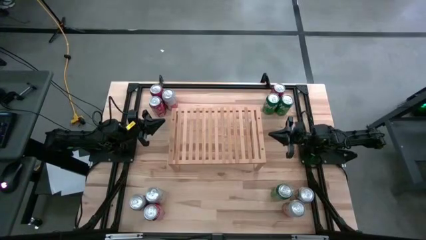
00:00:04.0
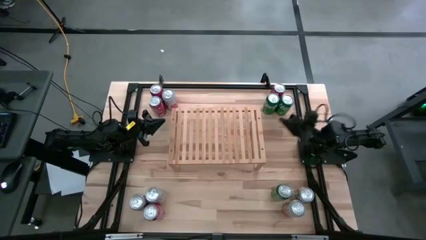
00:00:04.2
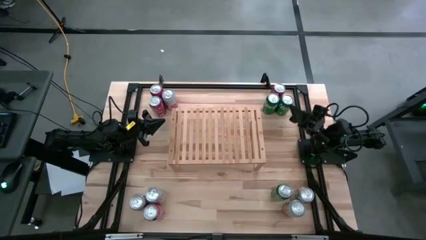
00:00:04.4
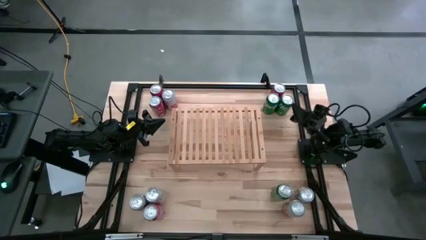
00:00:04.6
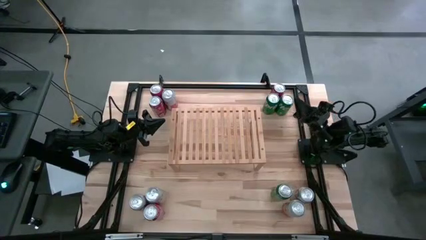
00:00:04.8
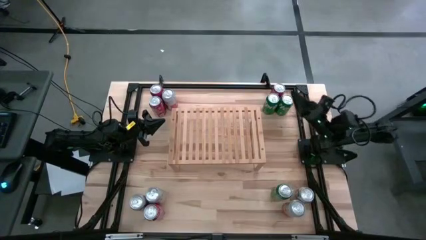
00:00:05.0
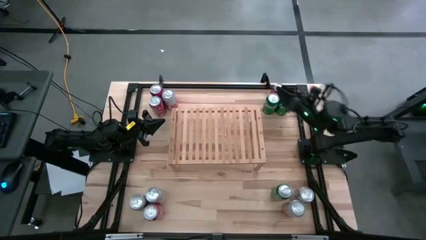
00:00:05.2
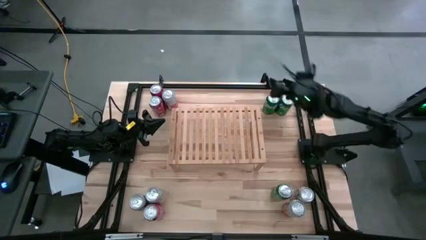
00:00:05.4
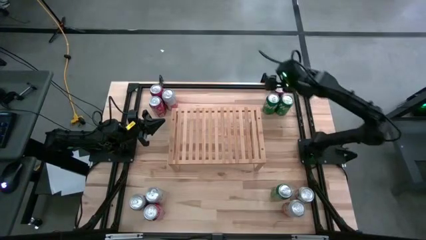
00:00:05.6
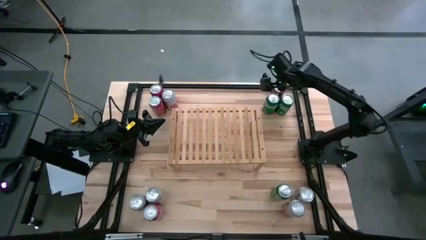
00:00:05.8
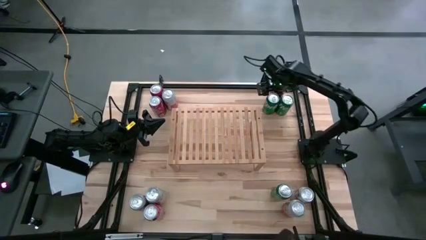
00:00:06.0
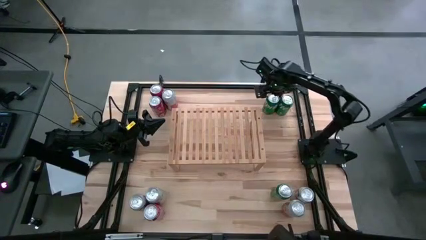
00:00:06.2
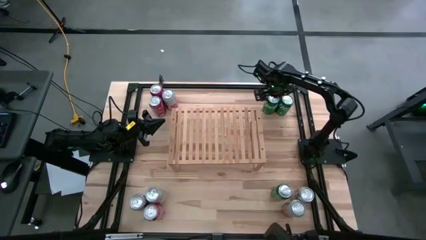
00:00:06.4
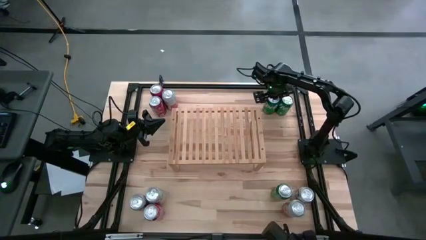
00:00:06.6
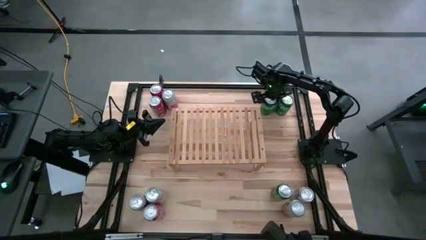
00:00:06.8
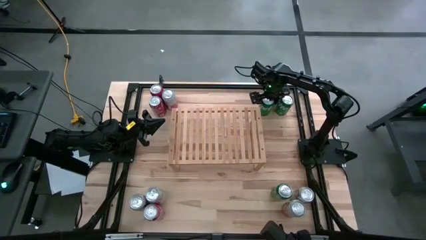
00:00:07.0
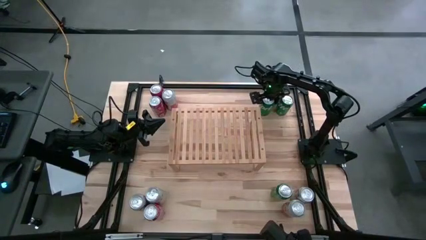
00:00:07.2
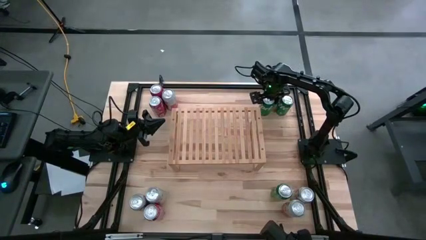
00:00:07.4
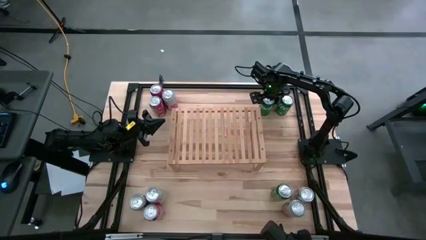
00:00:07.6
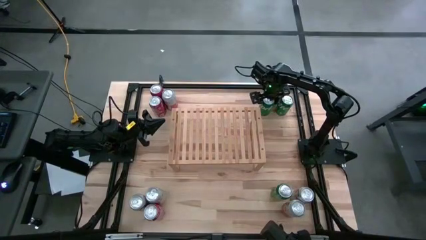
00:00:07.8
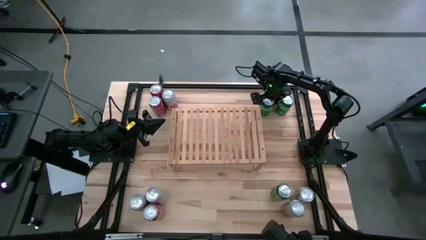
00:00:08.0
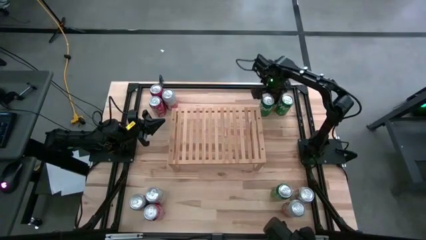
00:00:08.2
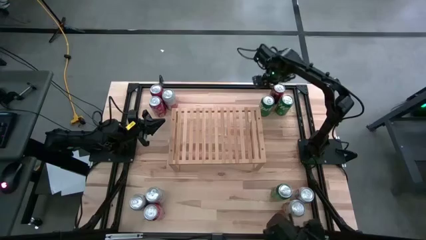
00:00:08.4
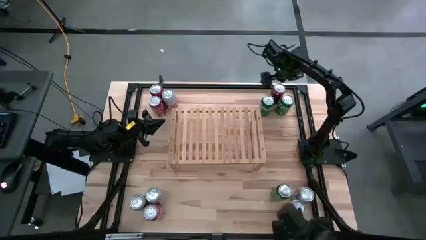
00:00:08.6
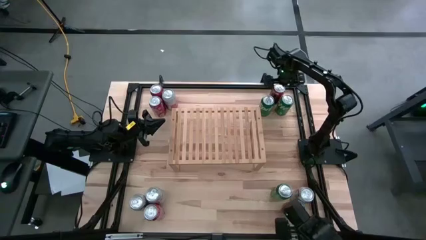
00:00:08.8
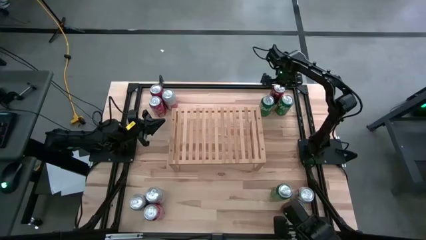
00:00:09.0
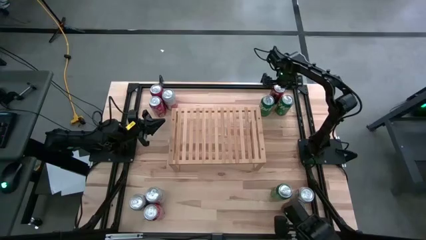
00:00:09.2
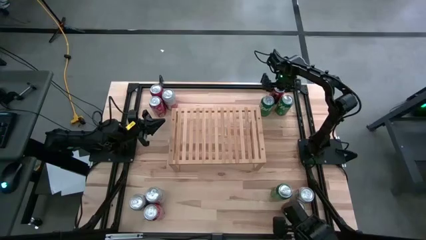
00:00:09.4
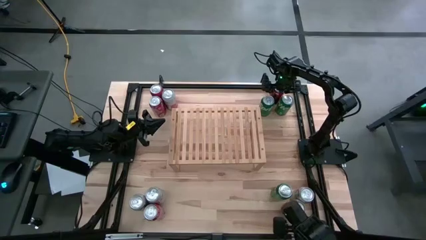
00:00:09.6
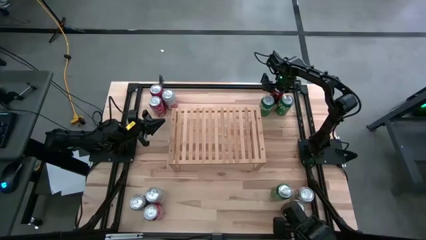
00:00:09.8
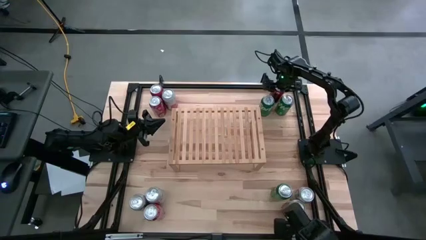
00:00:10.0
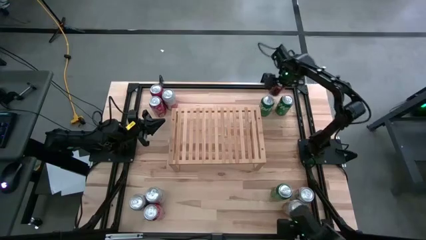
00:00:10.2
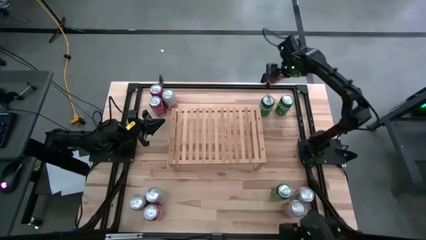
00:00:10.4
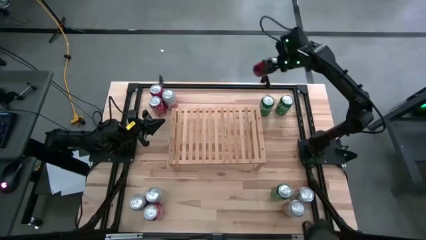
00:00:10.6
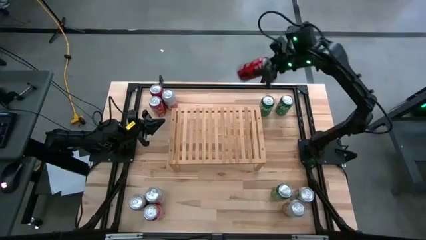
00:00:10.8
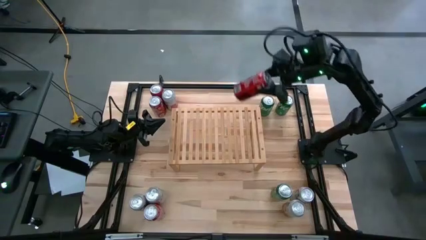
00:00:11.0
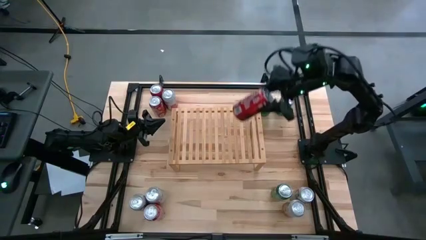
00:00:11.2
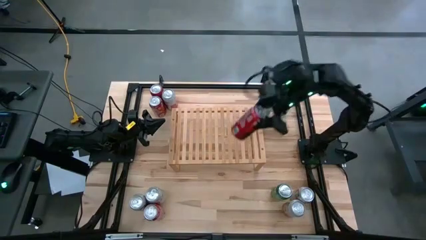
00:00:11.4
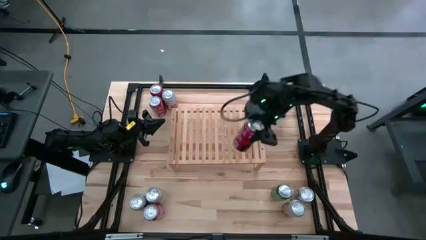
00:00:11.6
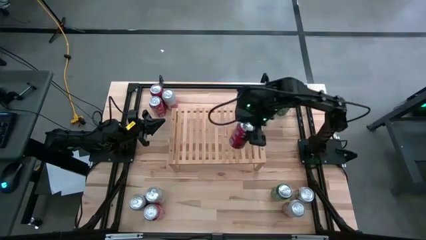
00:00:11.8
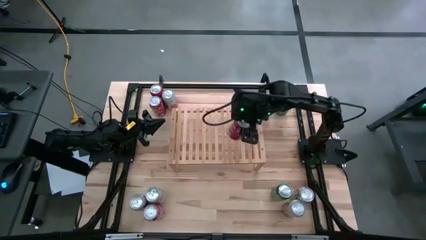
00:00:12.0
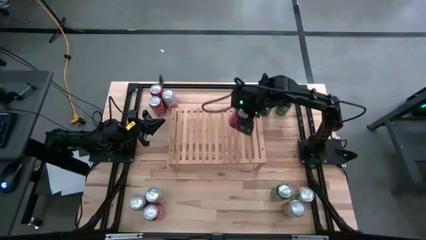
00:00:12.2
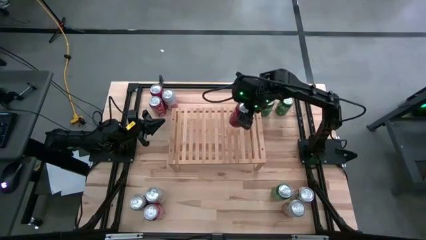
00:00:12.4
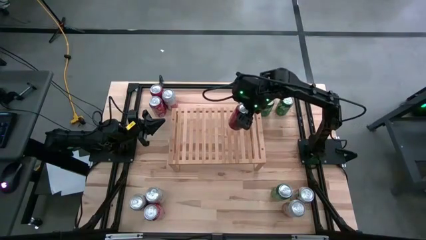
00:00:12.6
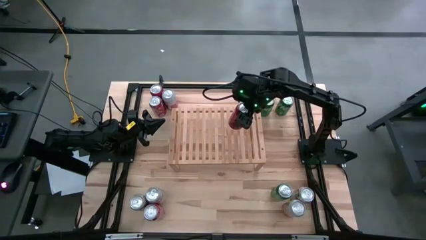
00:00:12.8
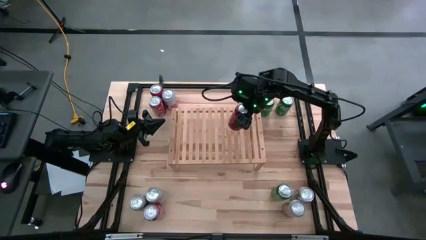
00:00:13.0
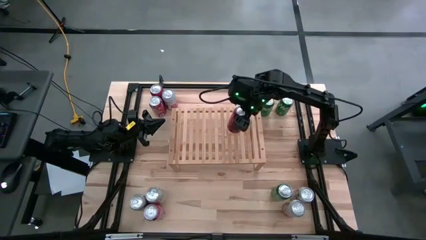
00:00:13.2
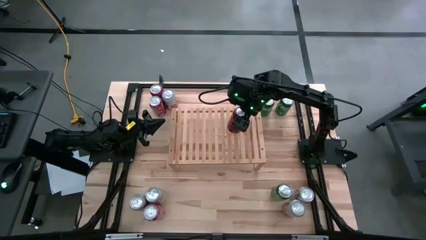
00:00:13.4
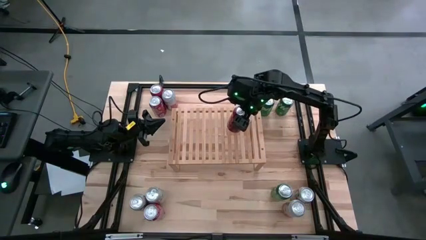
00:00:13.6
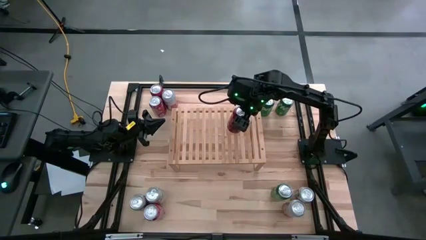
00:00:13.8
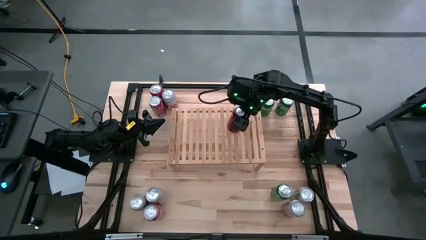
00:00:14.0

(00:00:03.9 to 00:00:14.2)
Task: Place canned beverage on shelf
Put the top right red soda can on the shelf
